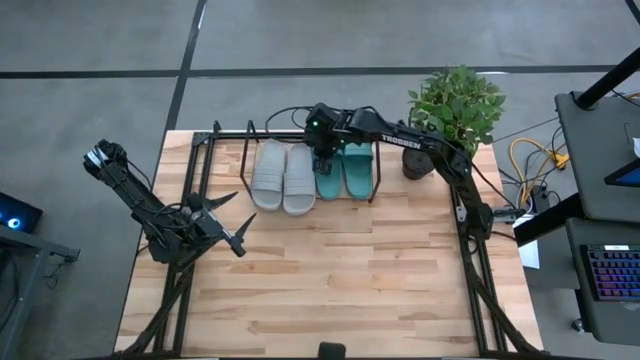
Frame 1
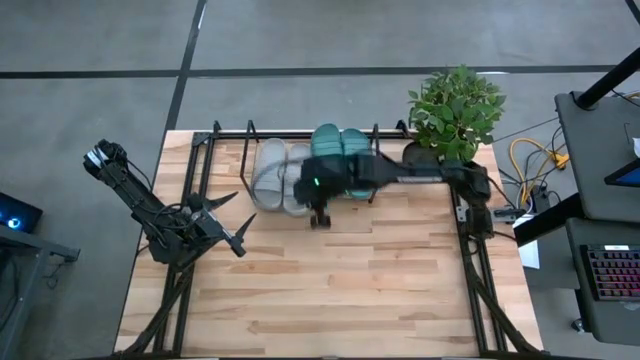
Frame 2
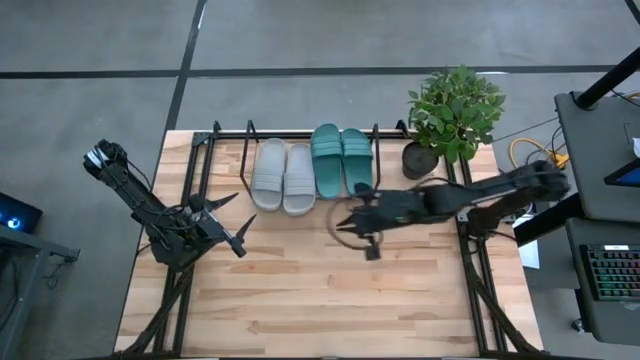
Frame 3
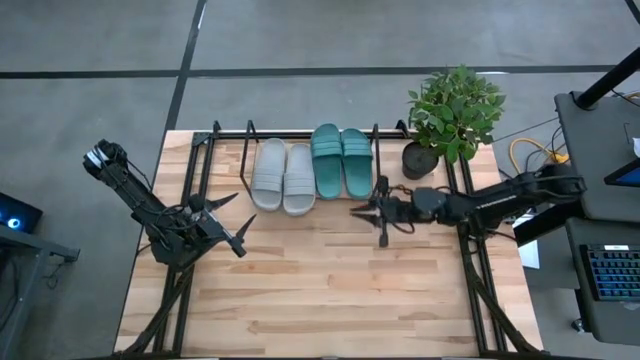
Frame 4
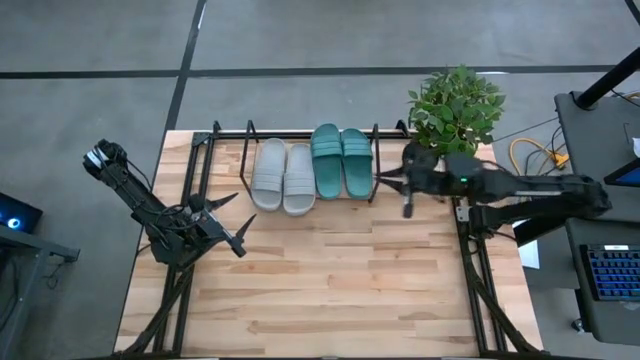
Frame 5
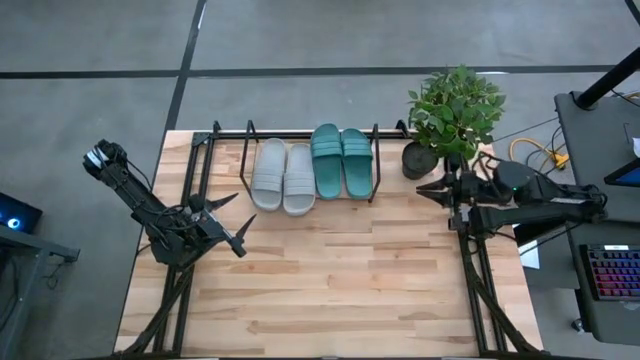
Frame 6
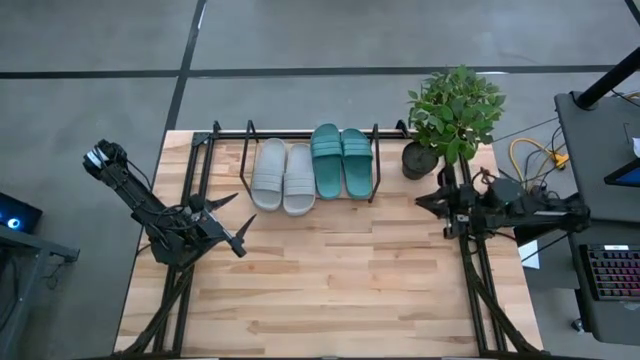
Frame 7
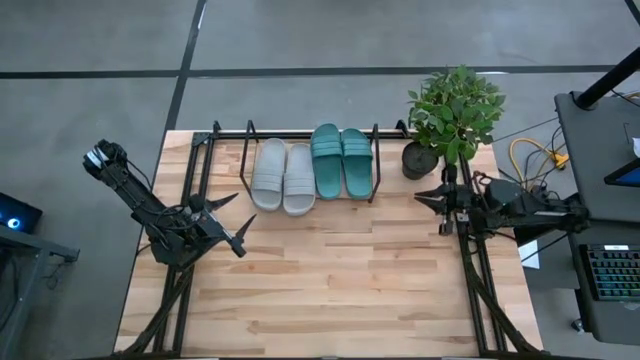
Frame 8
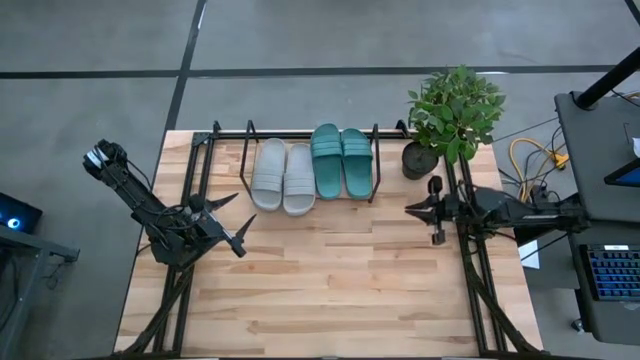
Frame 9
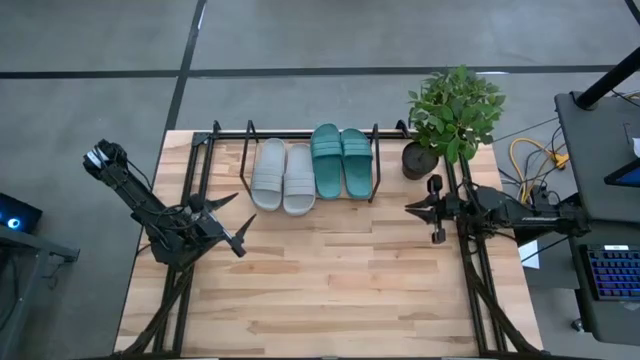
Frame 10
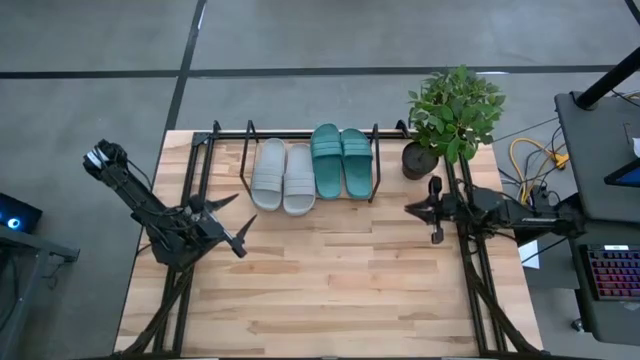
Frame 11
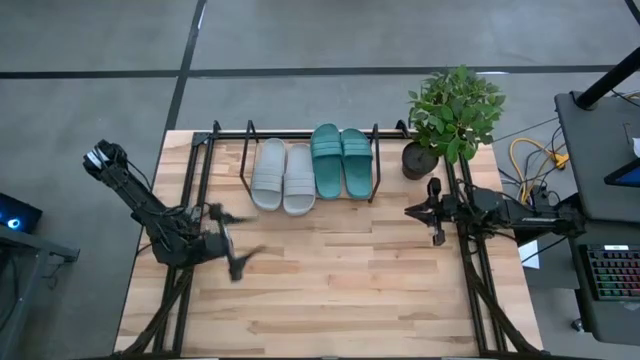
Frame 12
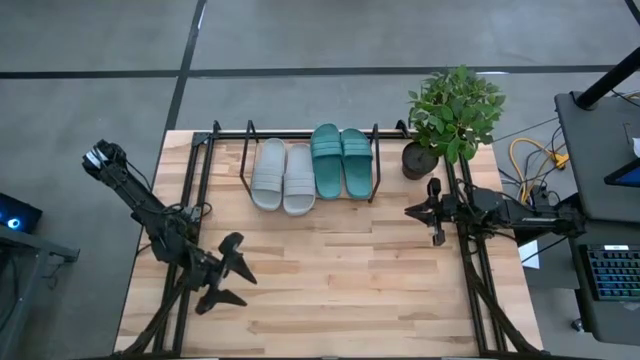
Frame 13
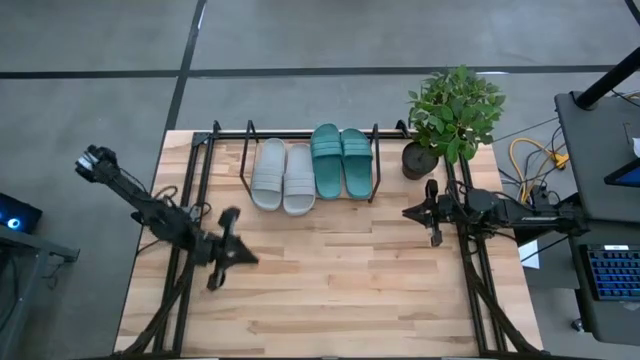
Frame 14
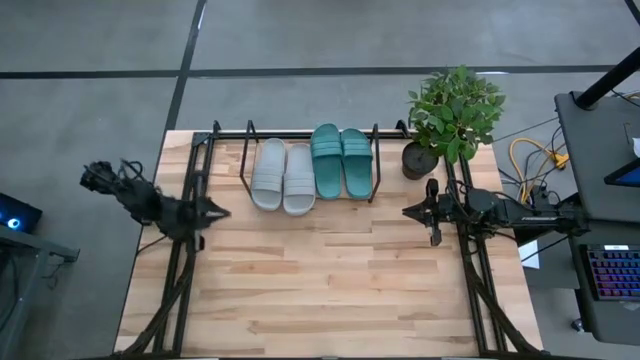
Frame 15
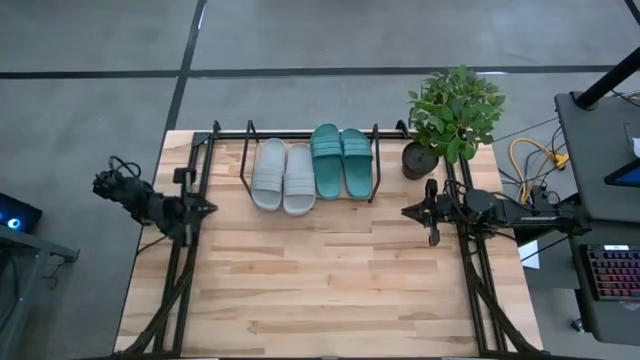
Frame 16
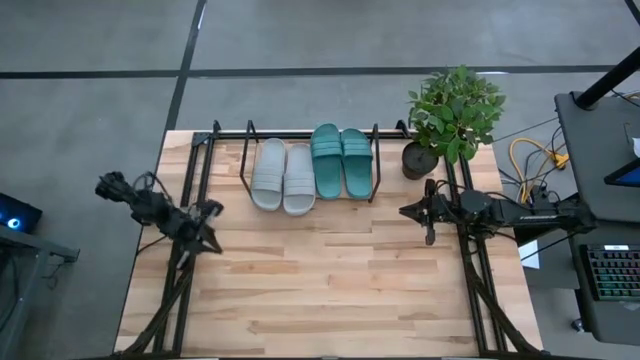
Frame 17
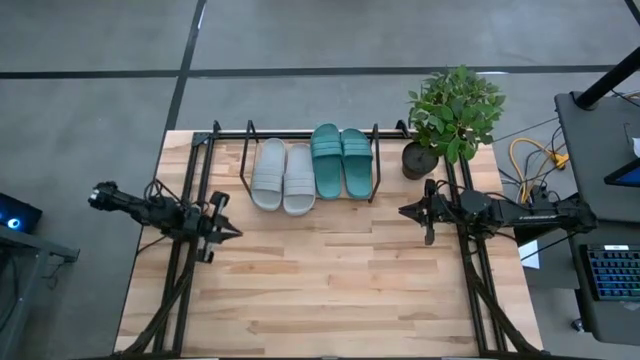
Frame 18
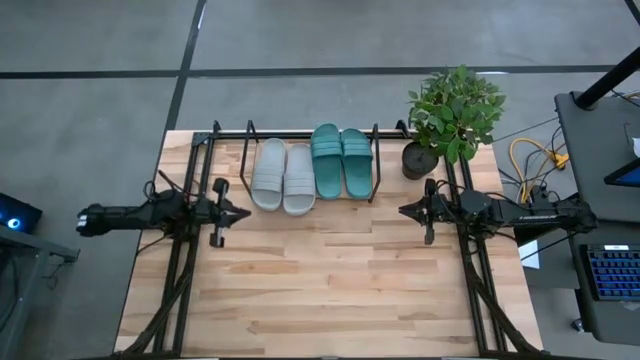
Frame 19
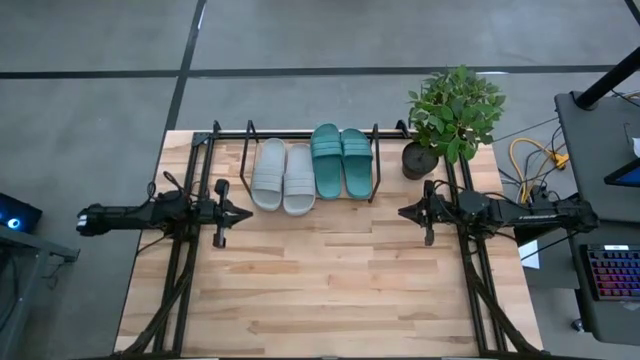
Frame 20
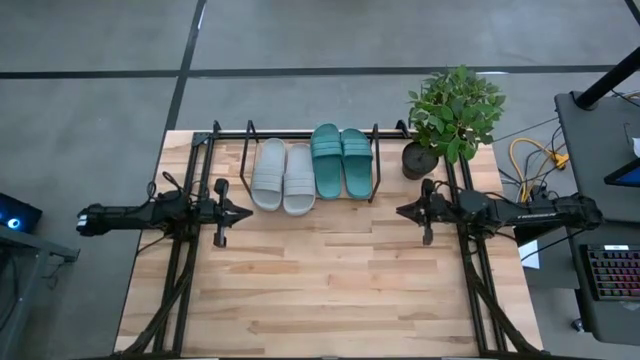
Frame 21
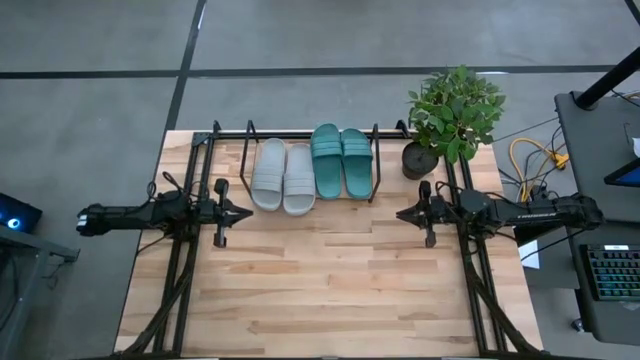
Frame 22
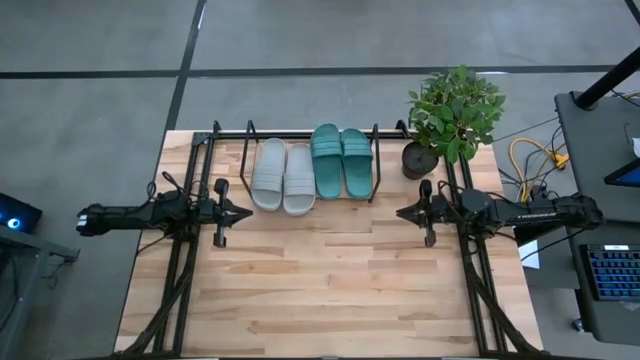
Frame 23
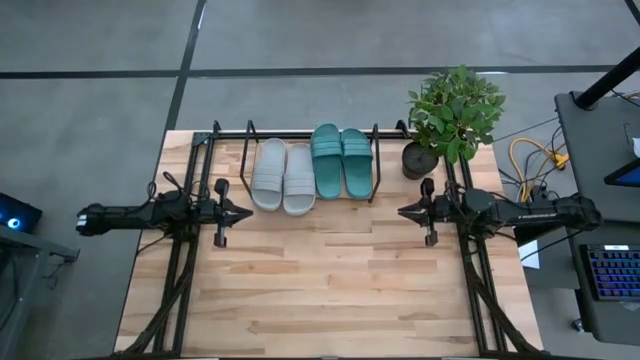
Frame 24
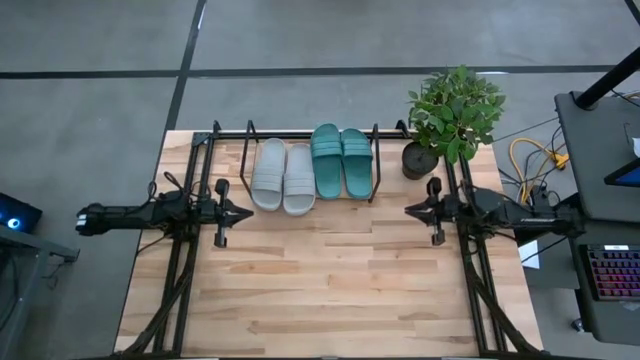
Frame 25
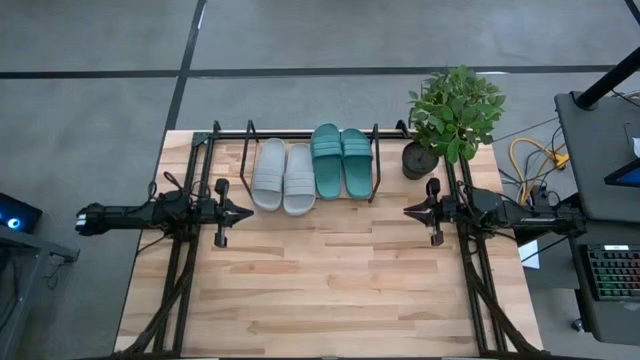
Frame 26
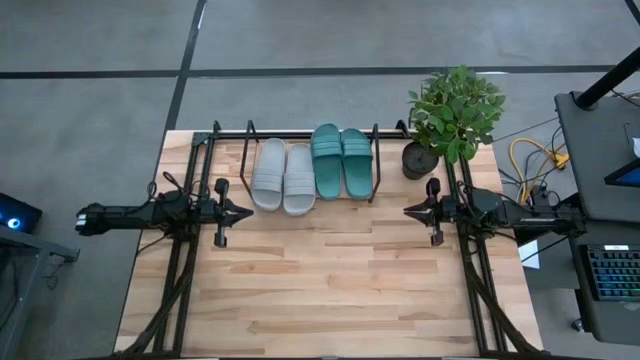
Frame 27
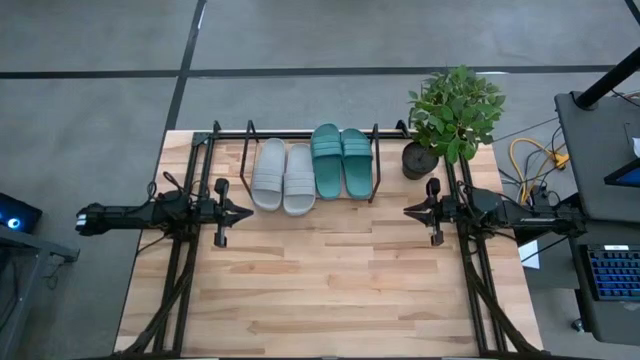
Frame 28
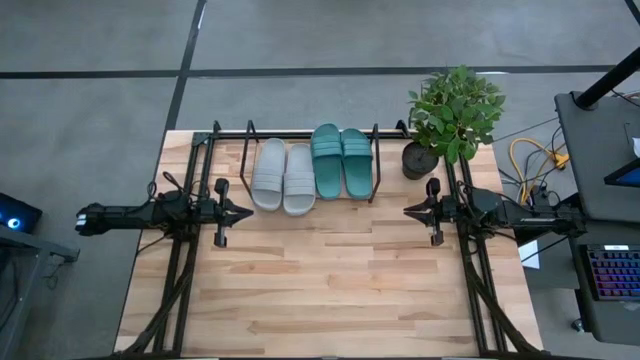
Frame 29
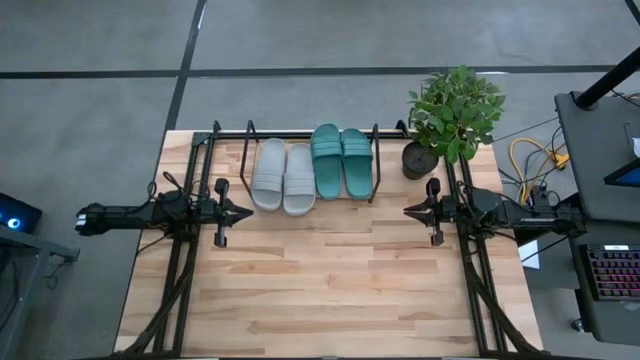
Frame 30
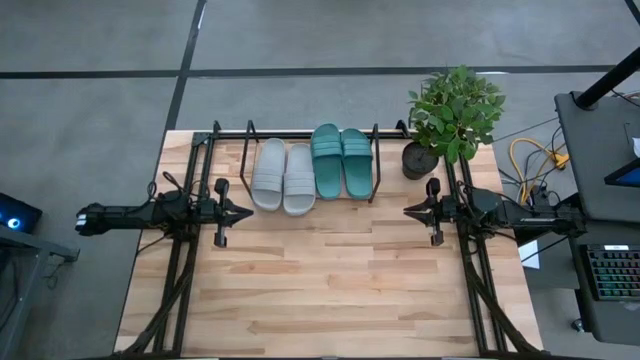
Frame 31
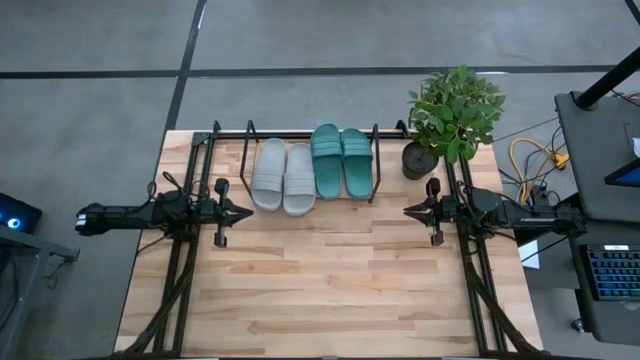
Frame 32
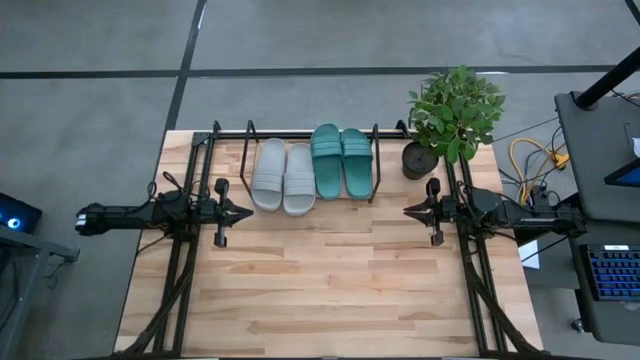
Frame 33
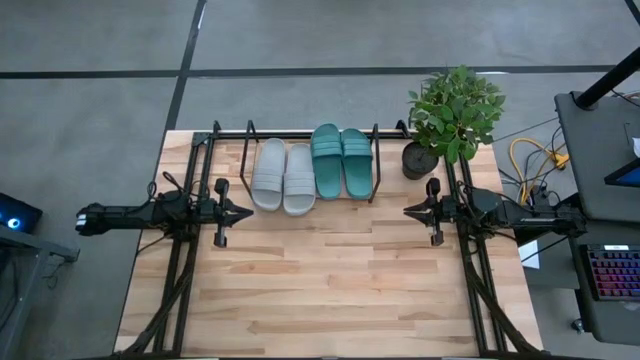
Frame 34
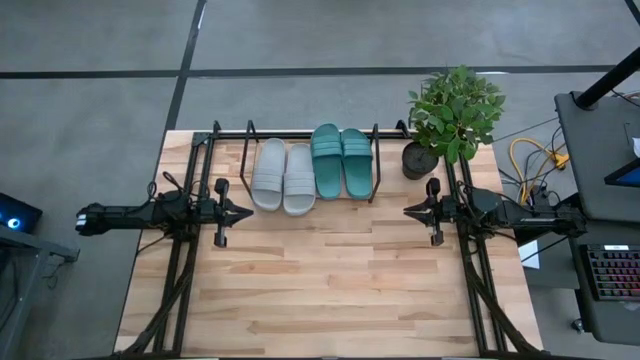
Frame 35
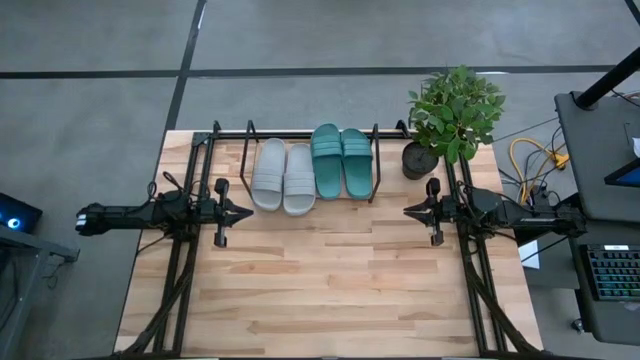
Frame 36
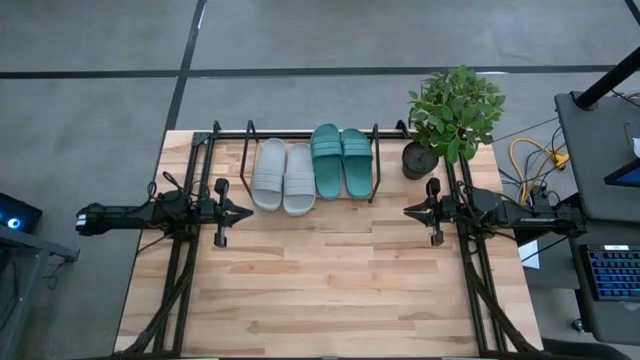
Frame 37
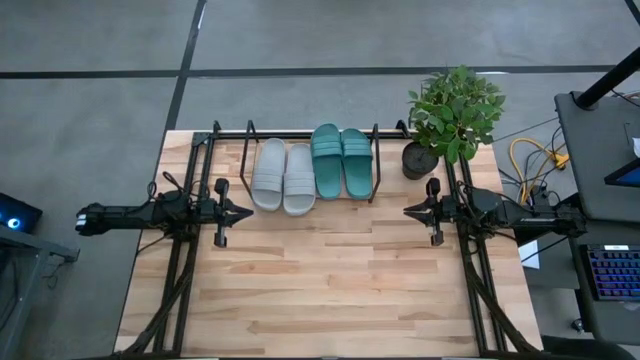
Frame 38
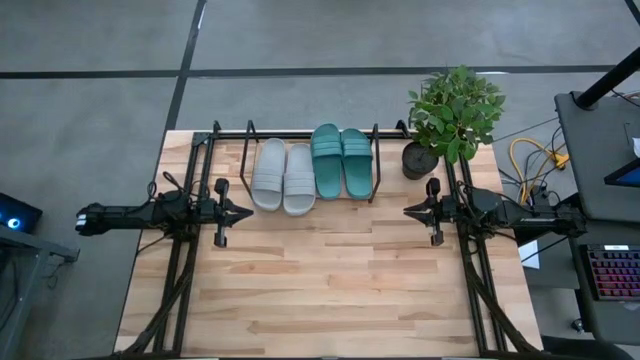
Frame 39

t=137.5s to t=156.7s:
Task: Pick and place slides into the shelf
Return to Home Position
